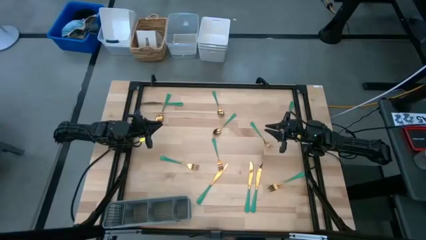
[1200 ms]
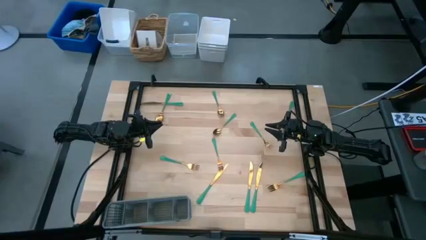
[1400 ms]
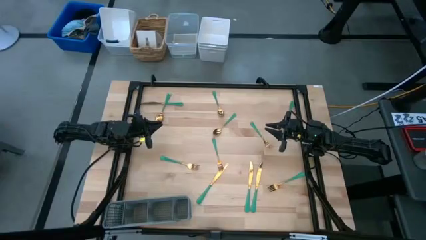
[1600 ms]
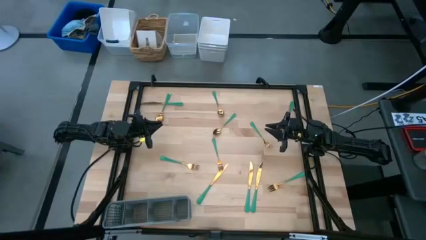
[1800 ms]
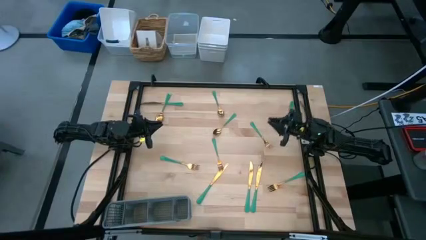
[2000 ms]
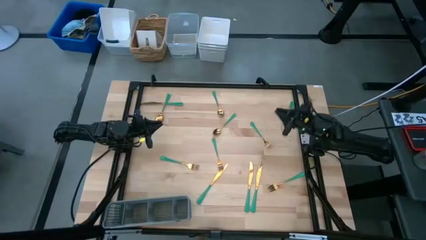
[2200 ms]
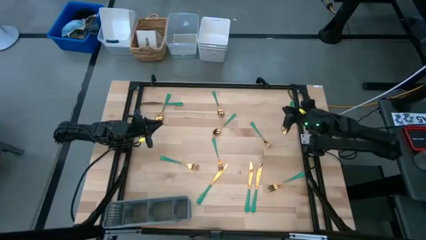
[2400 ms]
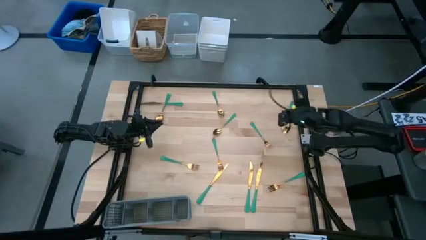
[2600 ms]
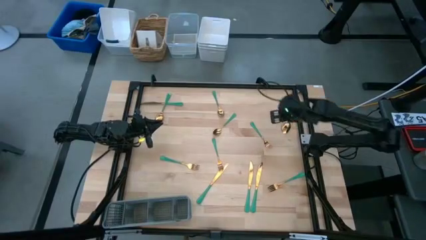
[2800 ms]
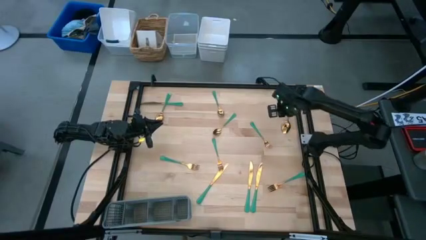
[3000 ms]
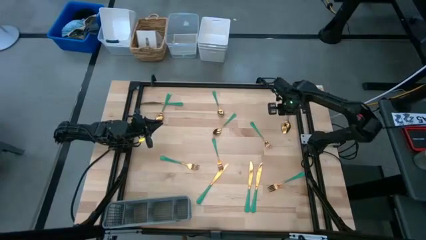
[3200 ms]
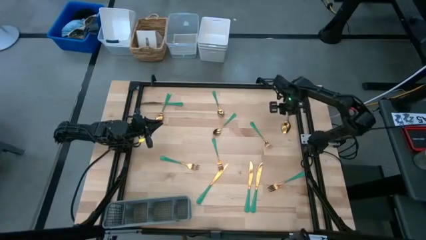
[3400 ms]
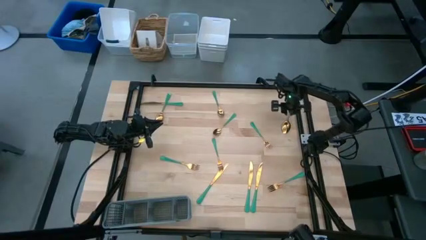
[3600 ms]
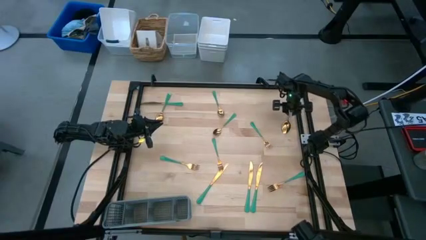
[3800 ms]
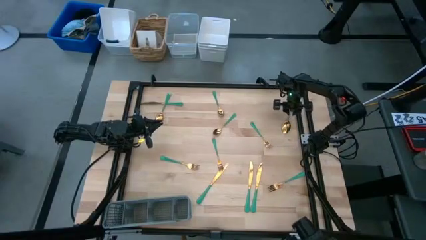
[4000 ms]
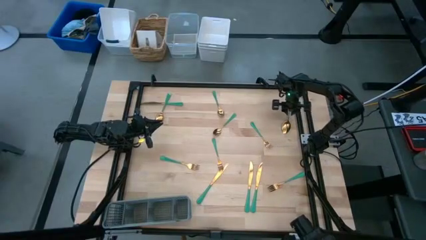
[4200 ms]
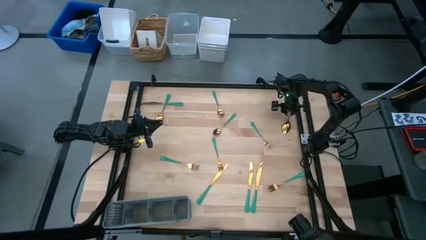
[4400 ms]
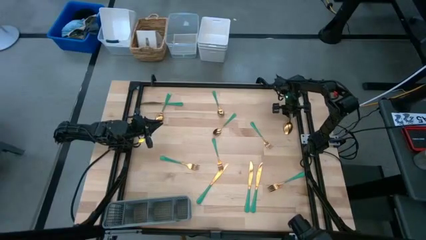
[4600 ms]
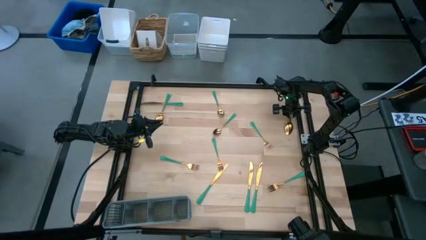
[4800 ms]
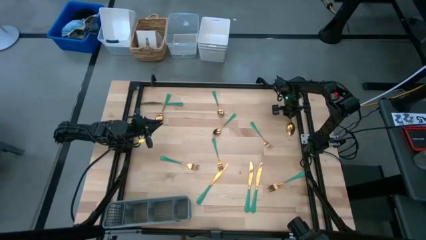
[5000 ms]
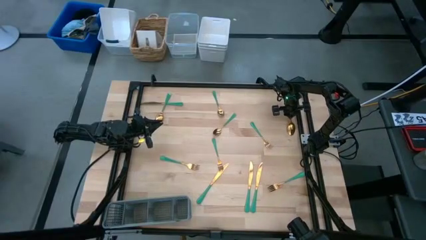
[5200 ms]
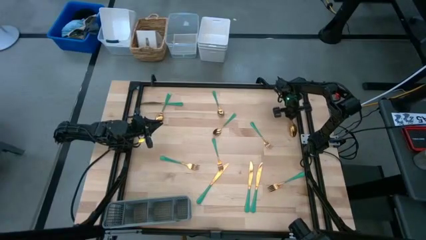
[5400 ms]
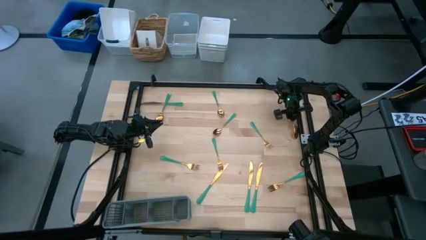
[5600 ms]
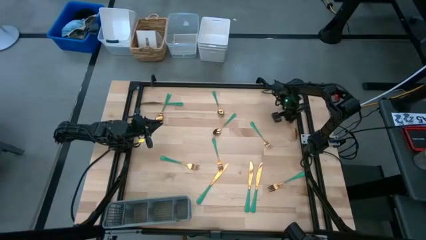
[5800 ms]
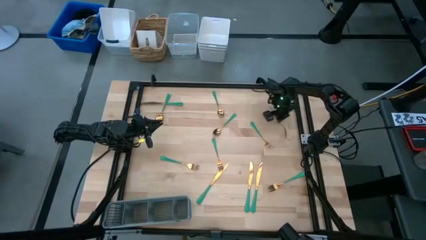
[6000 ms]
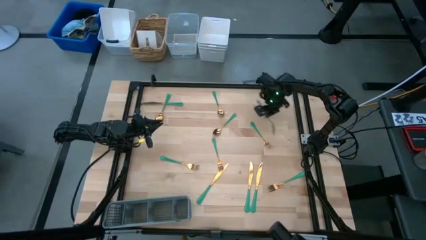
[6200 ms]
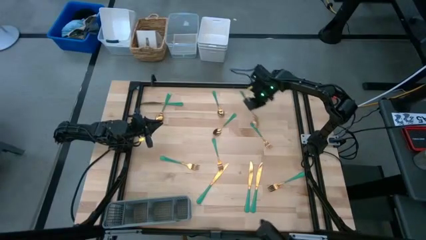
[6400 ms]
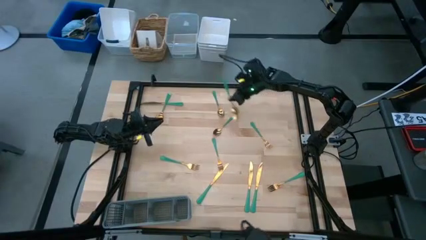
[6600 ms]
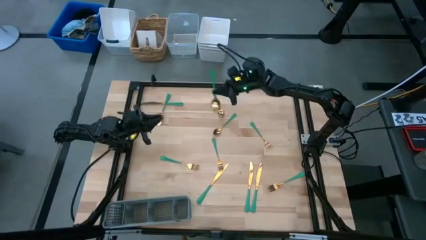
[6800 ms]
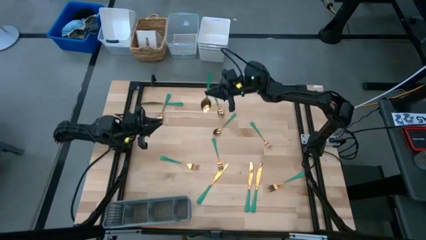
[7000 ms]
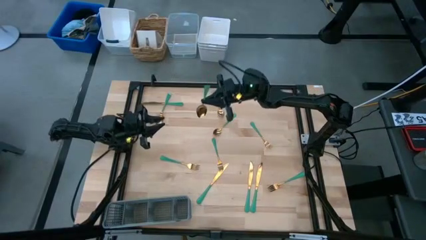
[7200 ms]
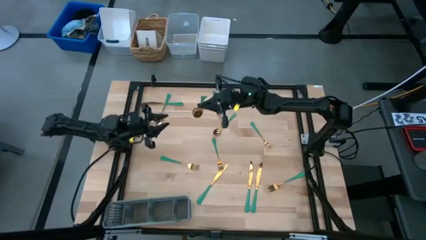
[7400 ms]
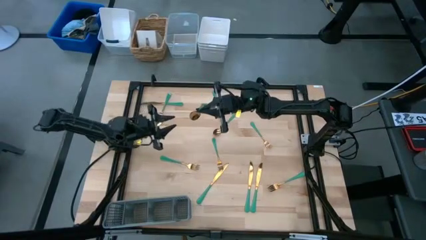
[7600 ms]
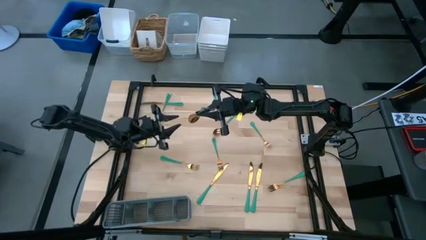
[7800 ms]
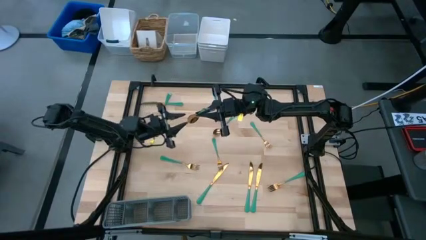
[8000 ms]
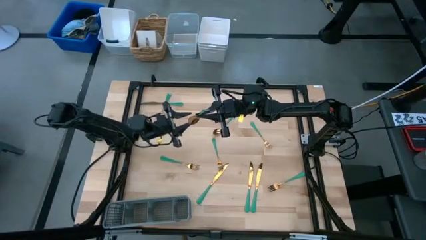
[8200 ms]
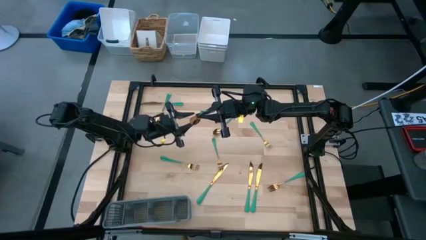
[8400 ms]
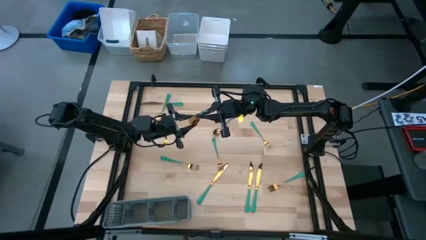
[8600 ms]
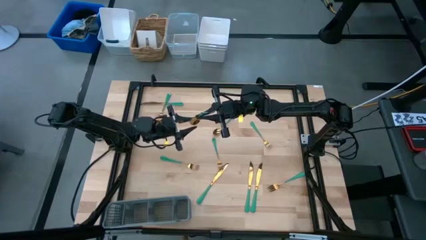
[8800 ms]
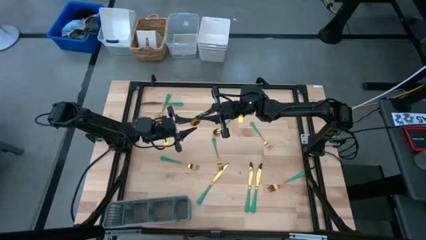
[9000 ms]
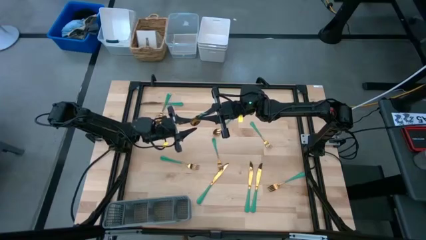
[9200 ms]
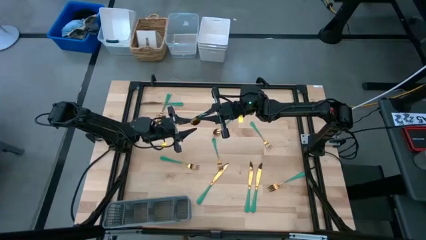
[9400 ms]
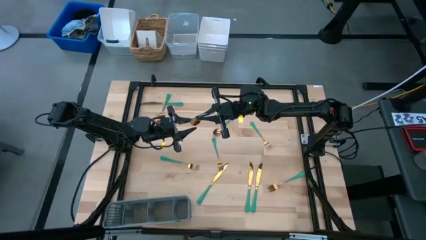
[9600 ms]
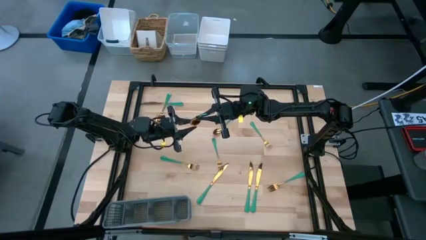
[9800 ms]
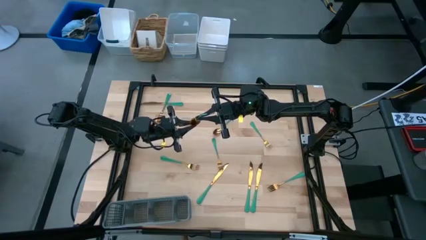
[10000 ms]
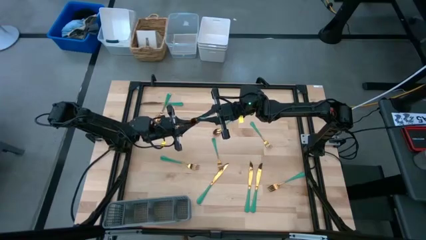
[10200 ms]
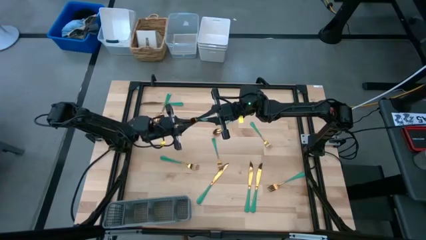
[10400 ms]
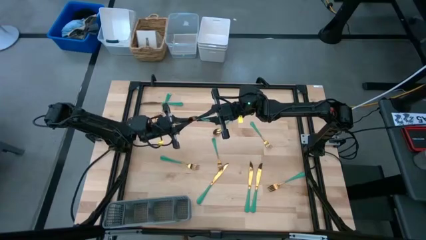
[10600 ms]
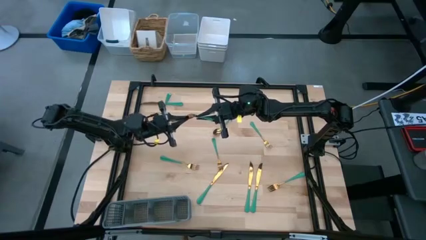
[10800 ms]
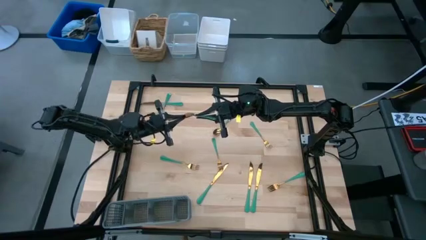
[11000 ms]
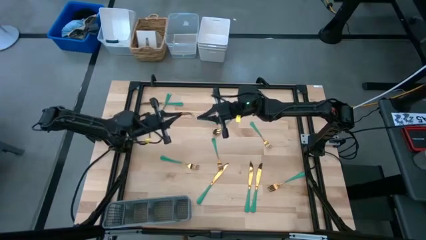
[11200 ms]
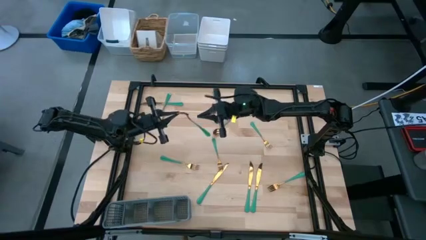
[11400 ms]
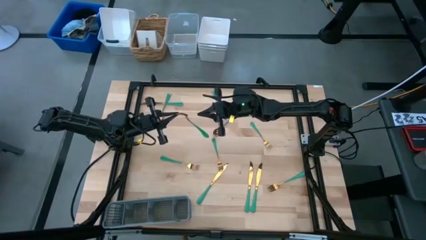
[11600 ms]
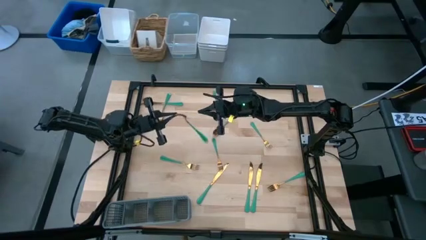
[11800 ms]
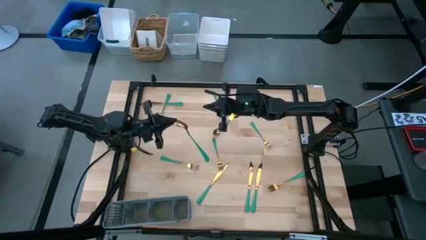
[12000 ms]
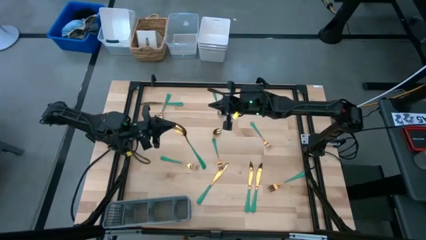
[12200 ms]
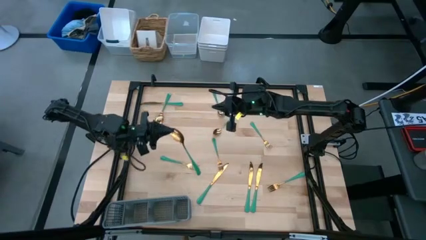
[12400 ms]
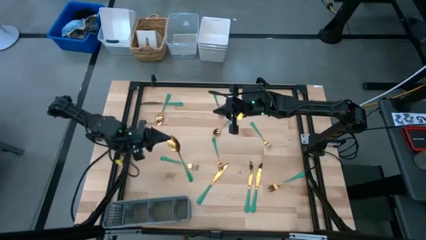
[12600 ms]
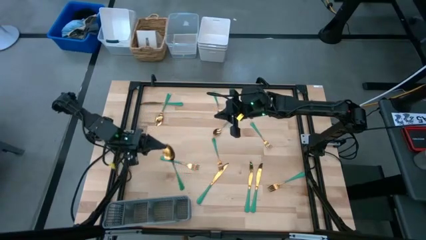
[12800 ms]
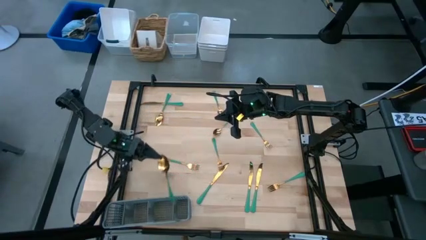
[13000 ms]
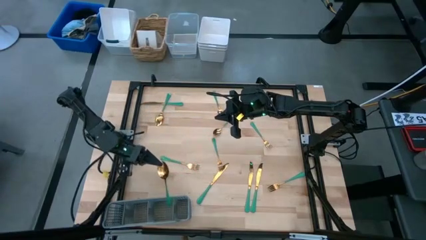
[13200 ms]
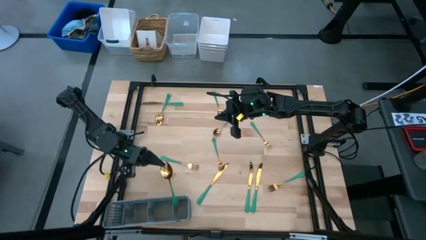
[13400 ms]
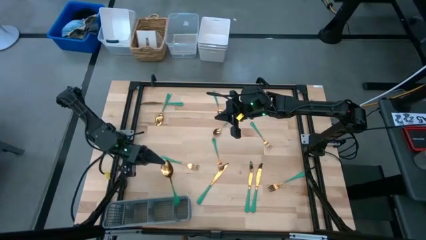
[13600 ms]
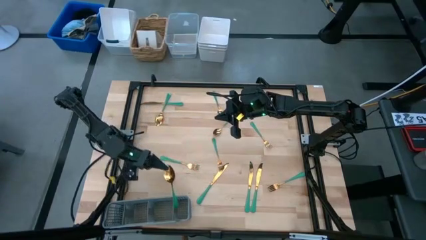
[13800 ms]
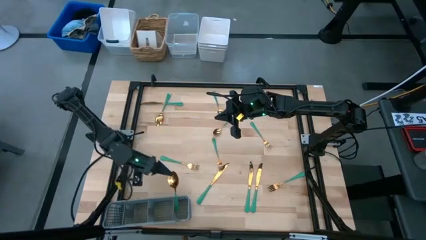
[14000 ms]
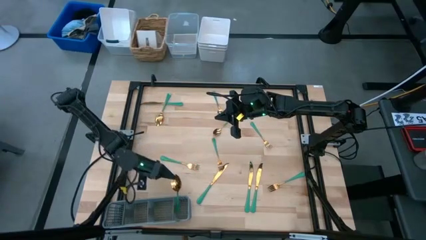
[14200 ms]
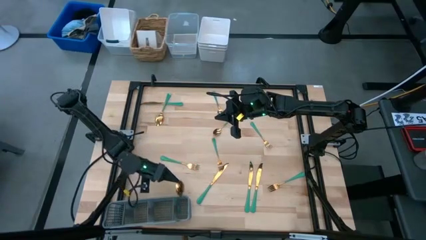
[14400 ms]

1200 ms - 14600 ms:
Task: Sort silverware
Put the right spoon into the cutlery rack
